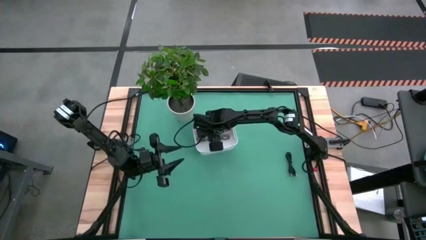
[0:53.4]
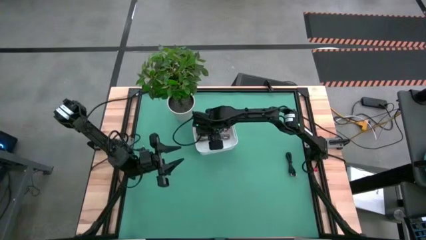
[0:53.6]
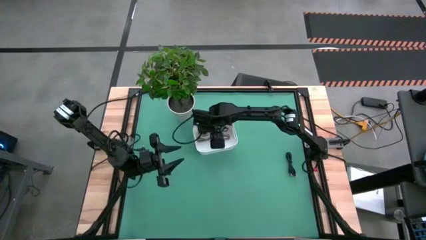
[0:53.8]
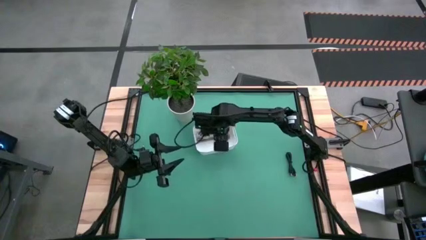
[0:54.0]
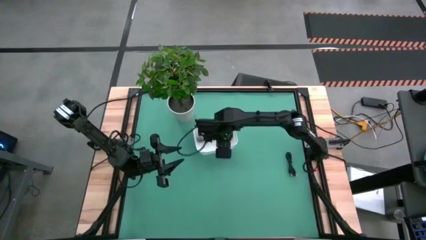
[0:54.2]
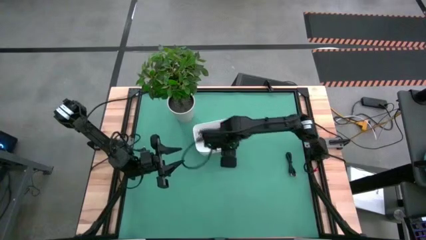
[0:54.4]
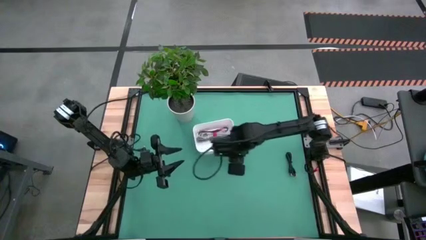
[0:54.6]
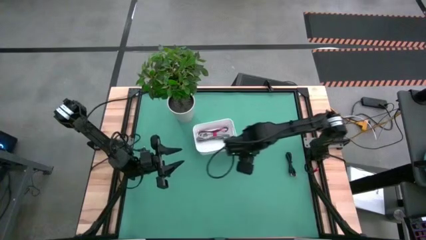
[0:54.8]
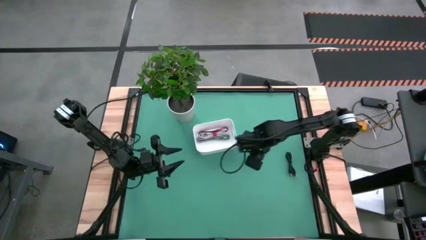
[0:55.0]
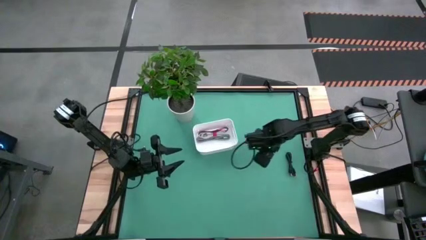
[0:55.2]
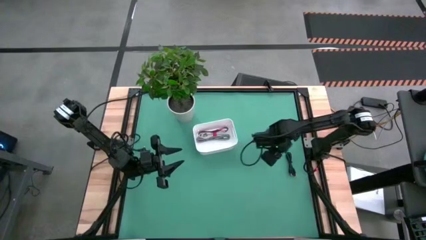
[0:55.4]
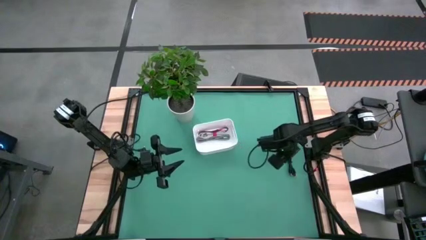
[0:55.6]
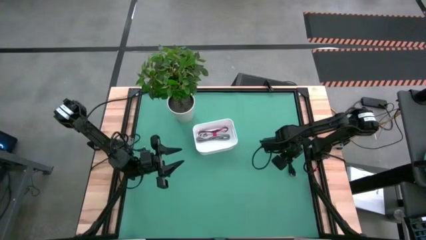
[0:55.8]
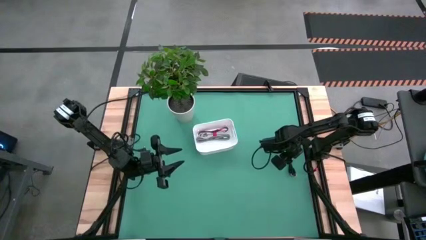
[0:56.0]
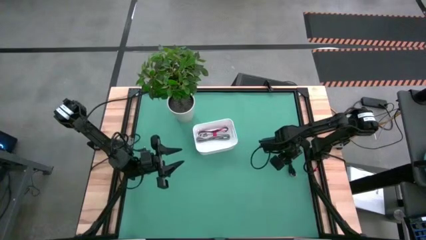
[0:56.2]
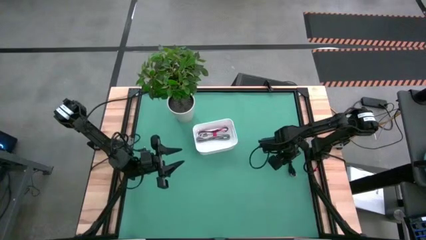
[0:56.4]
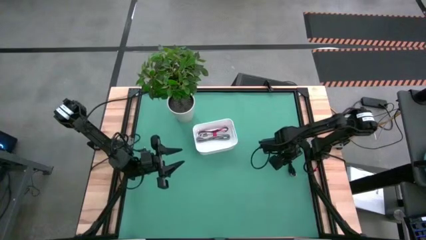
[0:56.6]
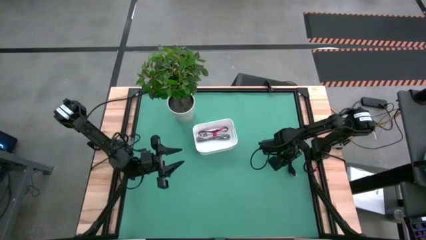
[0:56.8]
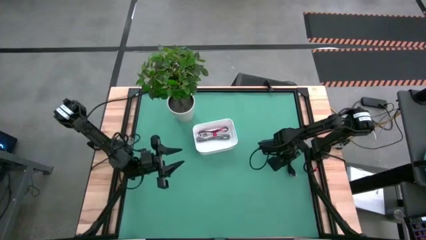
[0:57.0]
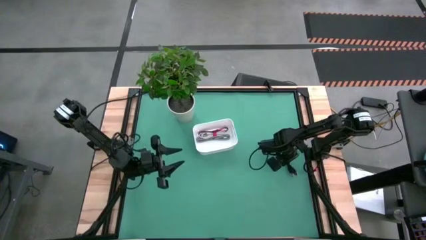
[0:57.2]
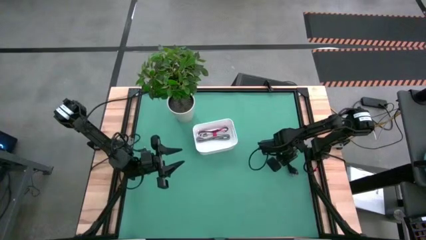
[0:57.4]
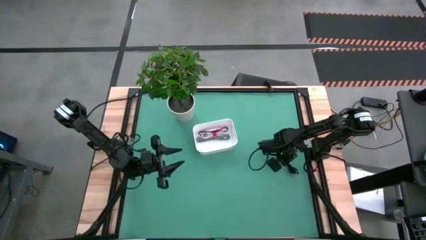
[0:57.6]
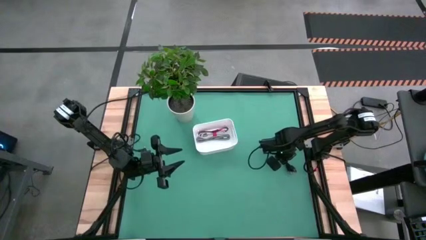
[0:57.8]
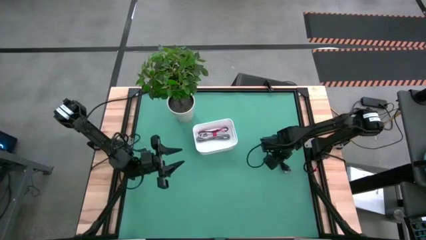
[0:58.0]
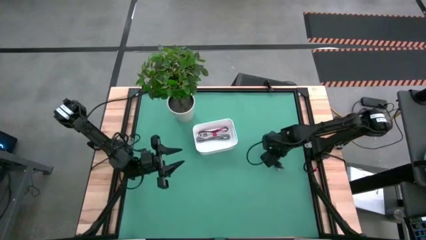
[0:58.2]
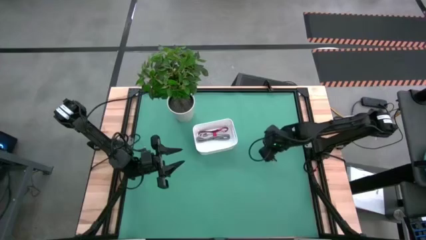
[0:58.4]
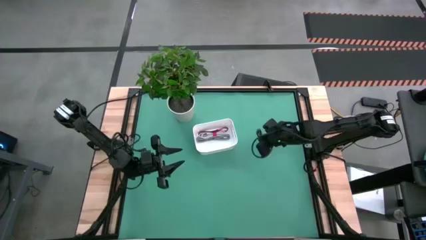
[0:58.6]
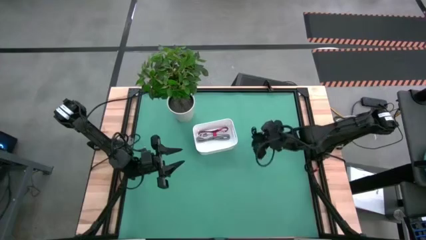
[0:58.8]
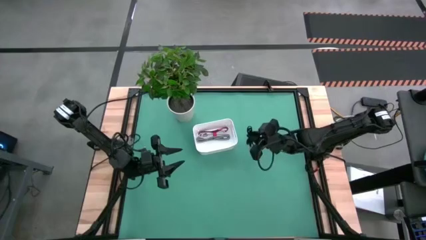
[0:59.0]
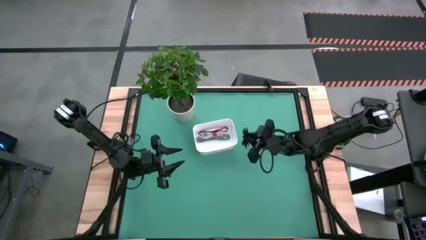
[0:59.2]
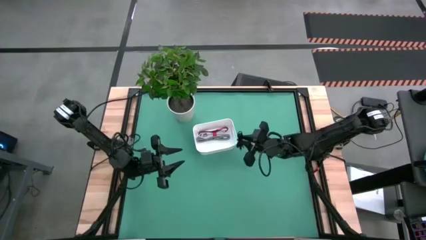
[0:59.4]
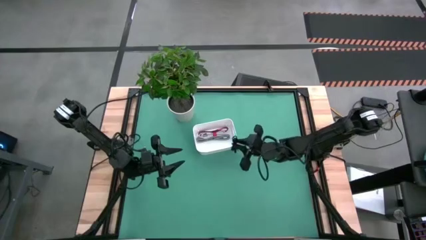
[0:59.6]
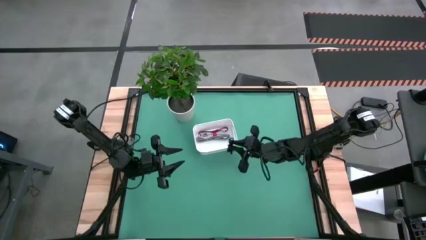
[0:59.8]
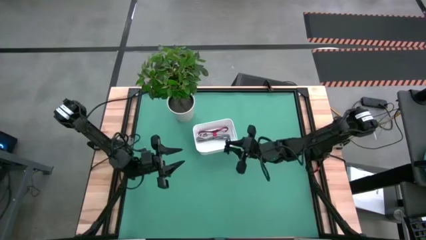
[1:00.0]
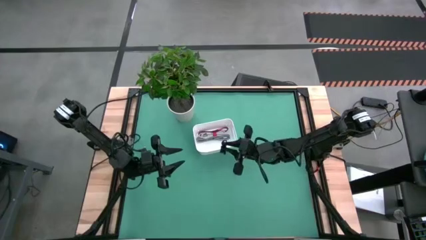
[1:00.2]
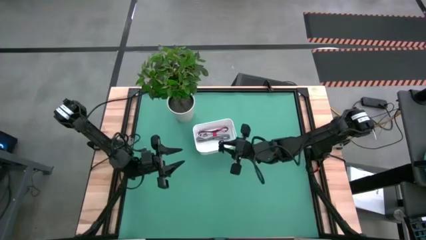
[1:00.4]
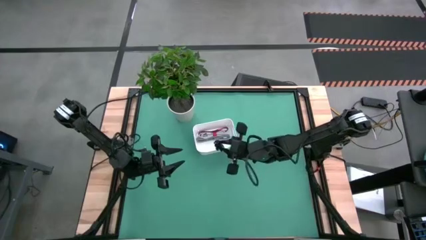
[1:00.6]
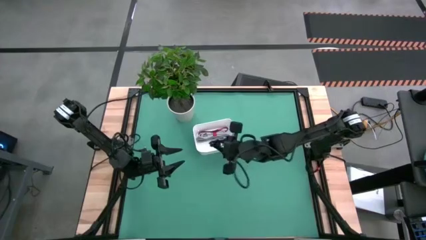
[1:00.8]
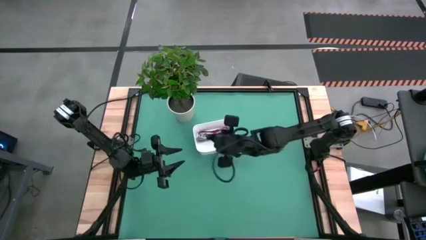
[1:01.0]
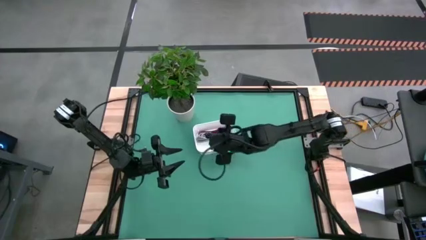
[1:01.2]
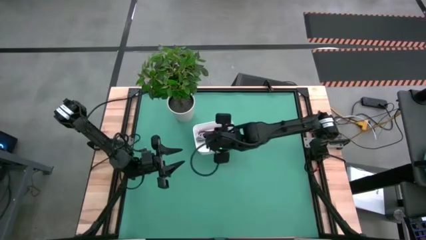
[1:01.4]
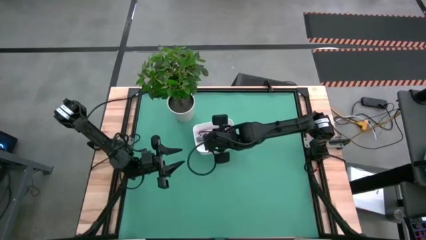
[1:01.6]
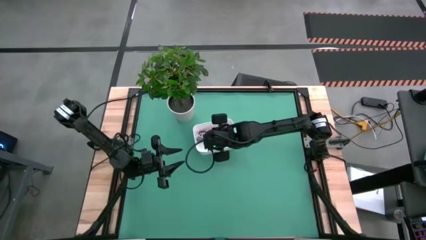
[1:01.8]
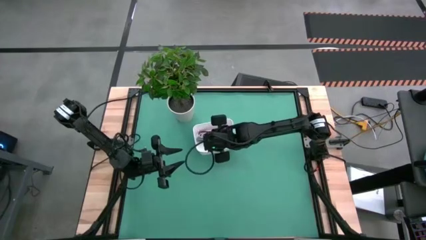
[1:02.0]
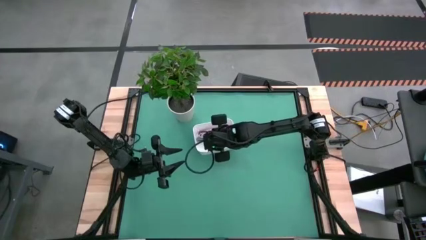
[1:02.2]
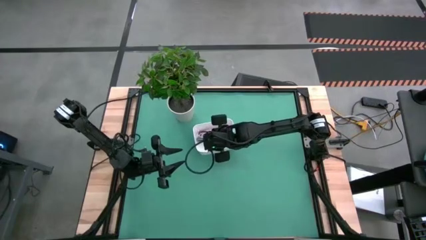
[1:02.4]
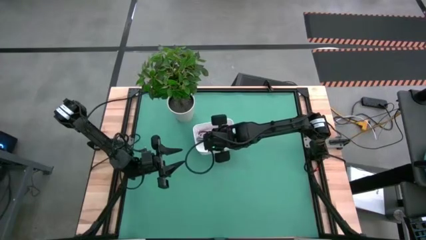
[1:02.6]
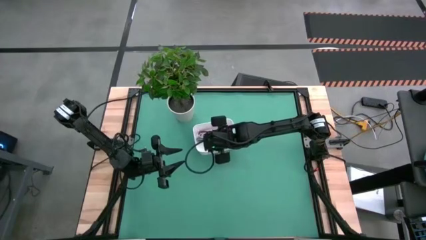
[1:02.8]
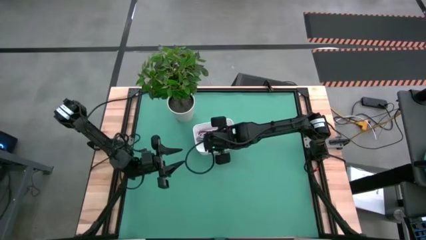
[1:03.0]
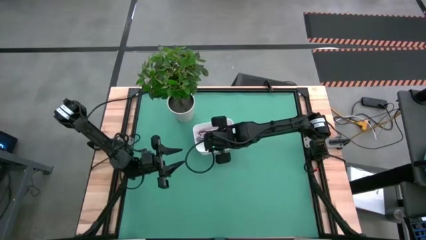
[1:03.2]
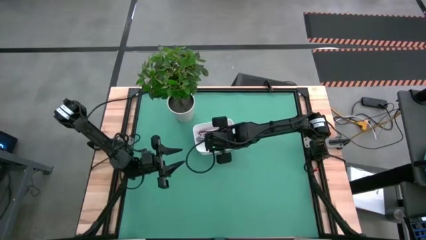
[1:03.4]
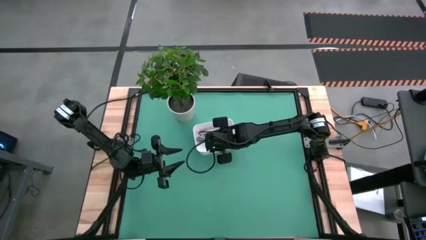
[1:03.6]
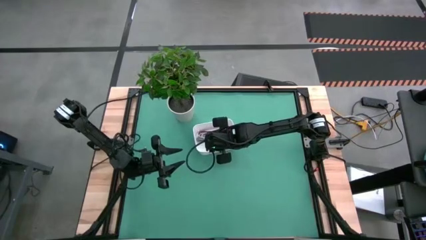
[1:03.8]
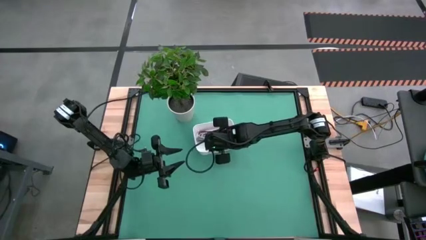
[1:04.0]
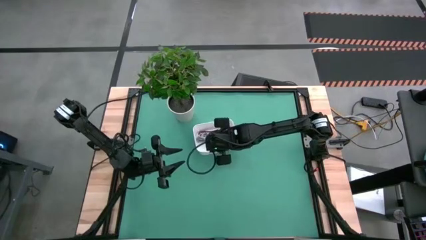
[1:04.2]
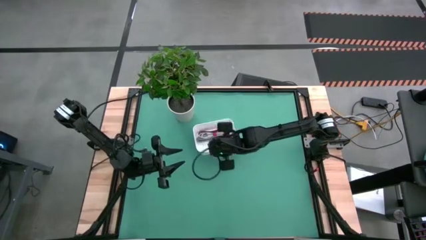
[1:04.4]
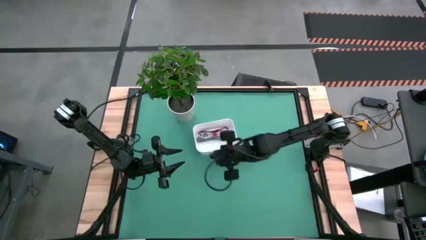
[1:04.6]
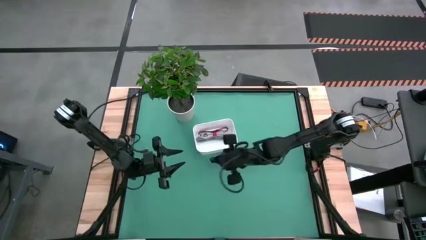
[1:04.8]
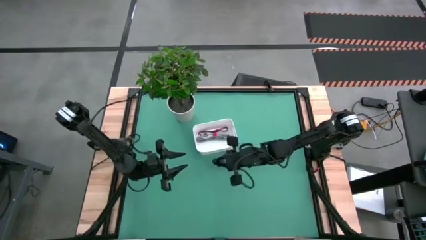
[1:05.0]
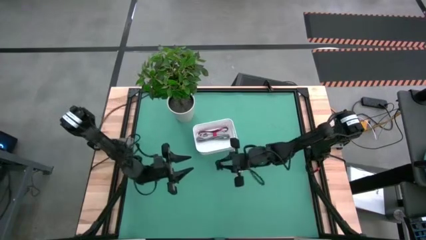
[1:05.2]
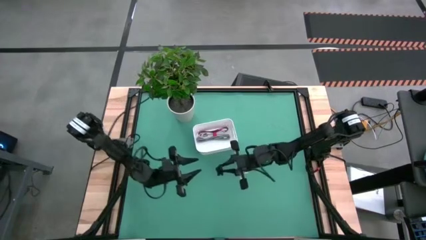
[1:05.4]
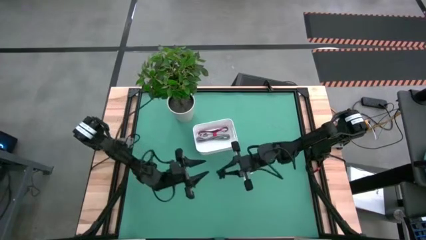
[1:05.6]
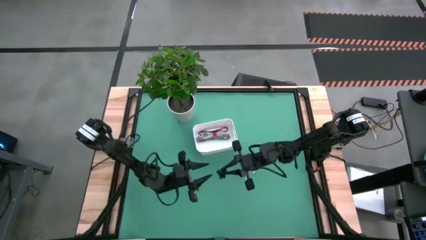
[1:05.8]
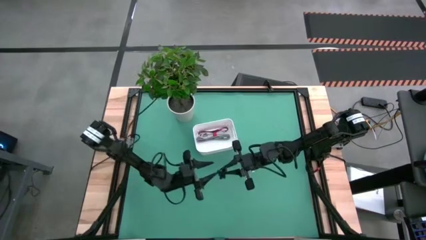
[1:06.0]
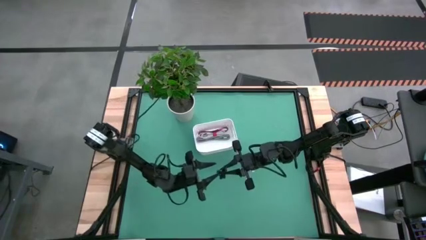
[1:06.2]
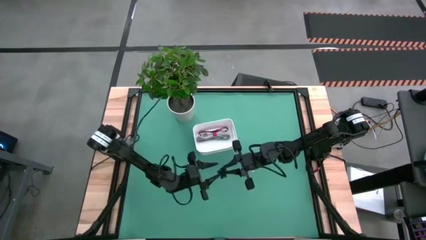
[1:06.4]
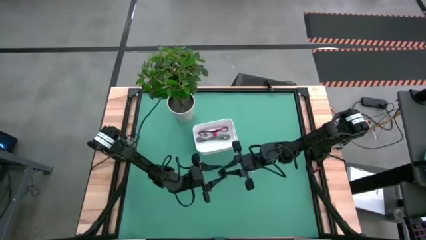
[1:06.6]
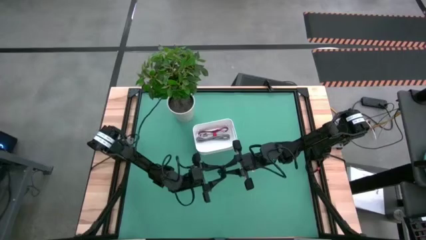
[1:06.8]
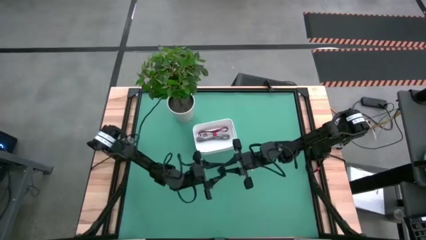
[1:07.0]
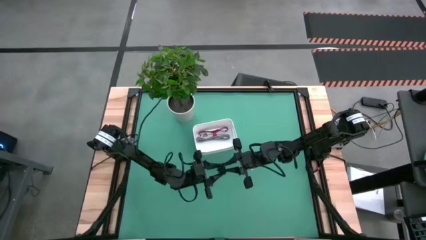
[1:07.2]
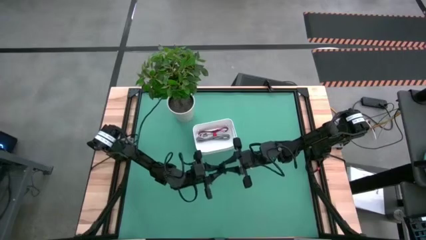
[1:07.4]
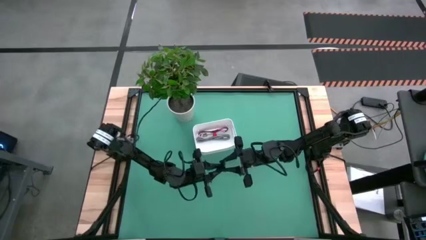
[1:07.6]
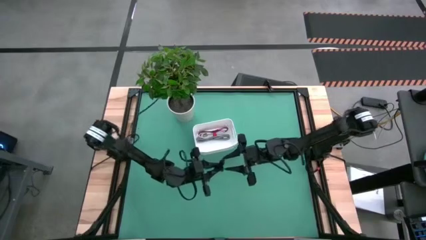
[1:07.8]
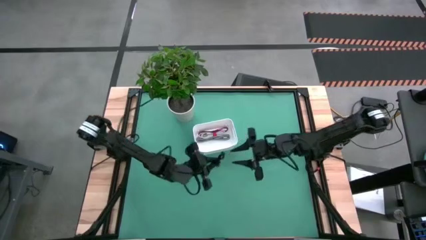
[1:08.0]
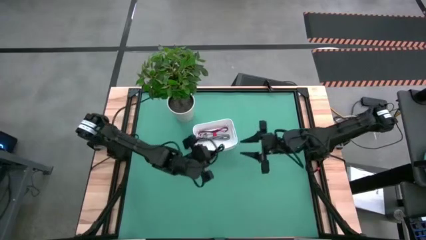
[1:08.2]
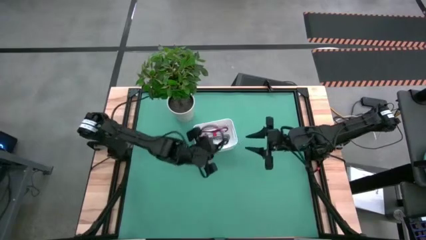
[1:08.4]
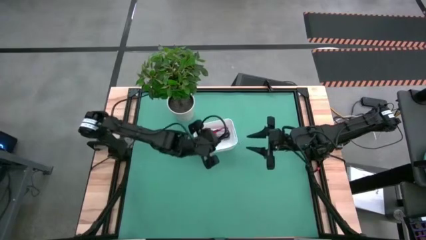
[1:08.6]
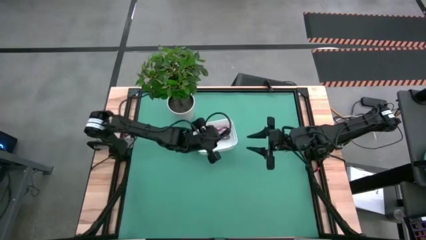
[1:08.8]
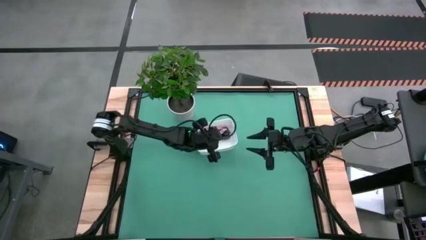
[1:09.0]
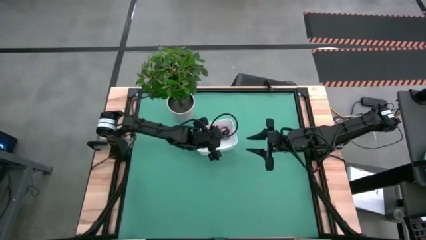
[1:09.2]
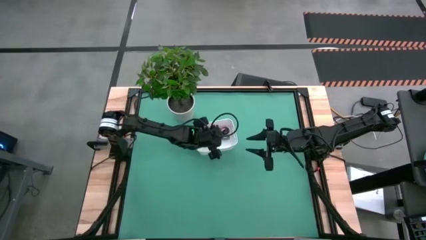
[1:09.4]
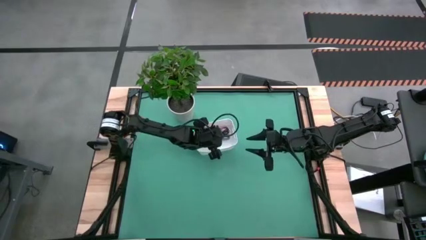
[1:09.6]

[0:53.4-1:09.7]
Task: Pick and place USB-C Cables
Put the black charger cable into the white bin
